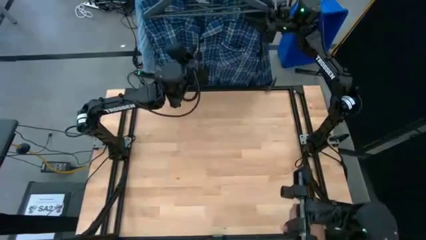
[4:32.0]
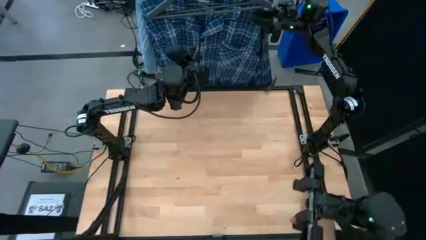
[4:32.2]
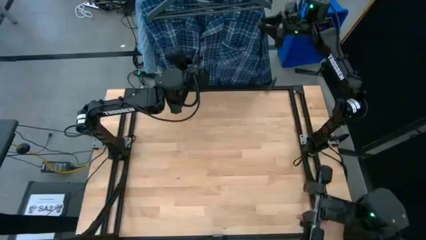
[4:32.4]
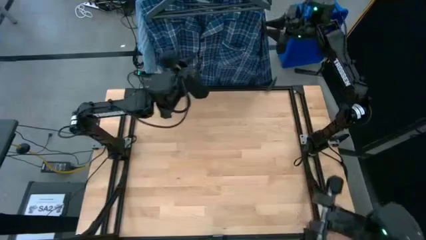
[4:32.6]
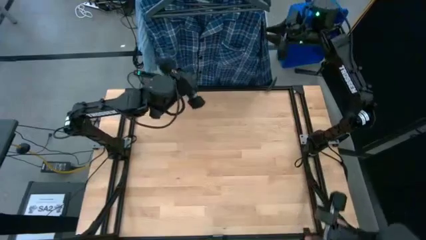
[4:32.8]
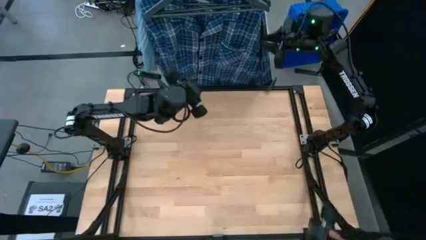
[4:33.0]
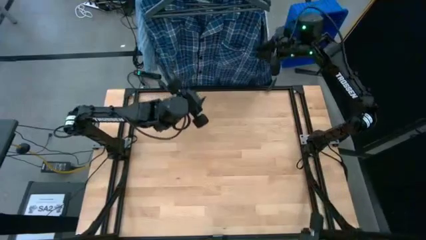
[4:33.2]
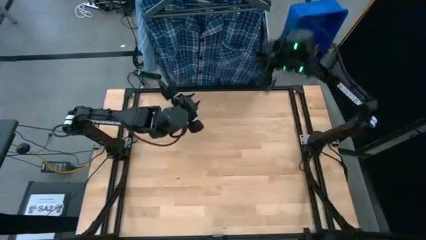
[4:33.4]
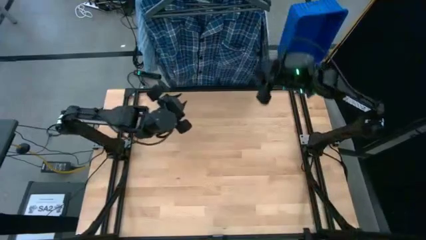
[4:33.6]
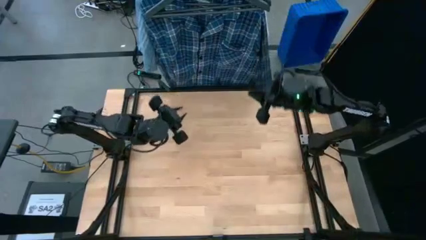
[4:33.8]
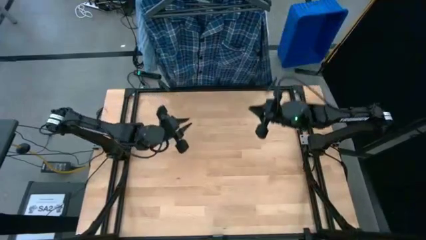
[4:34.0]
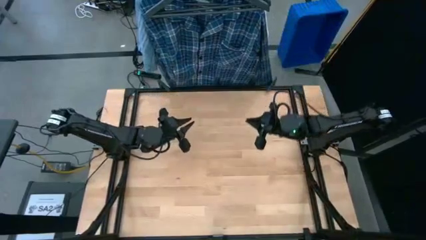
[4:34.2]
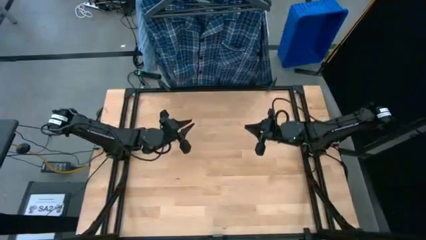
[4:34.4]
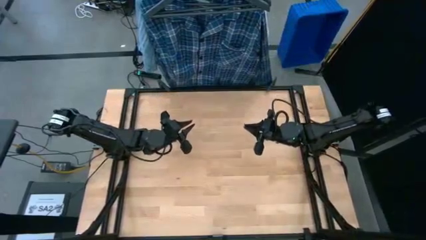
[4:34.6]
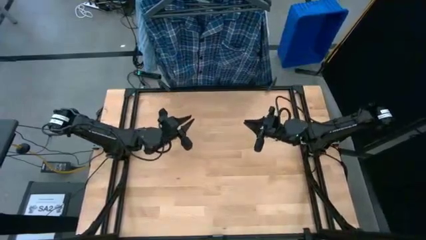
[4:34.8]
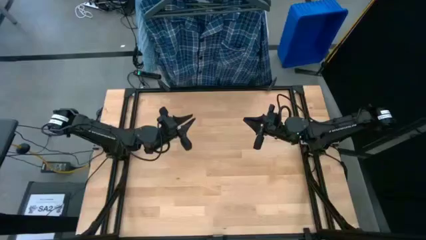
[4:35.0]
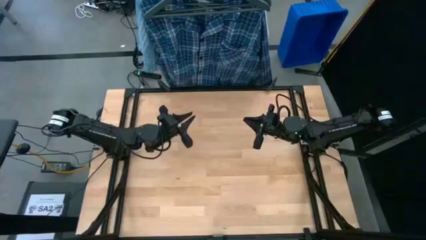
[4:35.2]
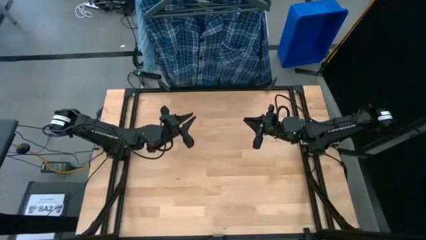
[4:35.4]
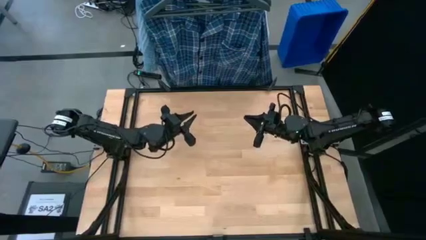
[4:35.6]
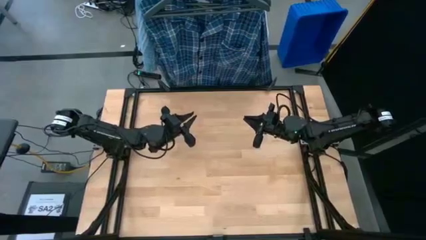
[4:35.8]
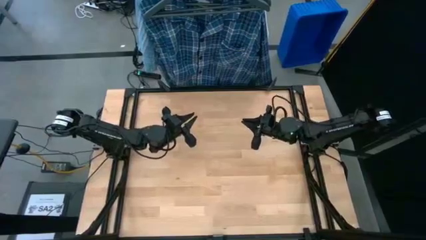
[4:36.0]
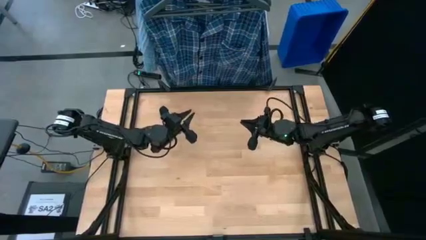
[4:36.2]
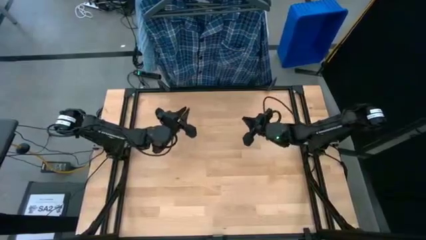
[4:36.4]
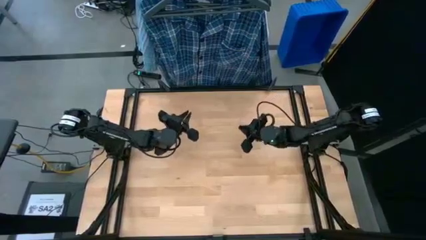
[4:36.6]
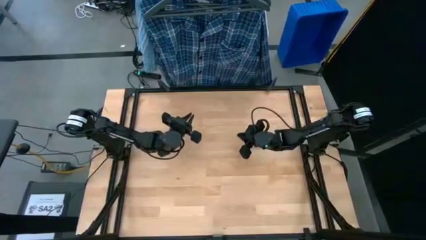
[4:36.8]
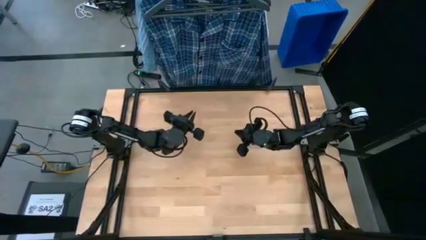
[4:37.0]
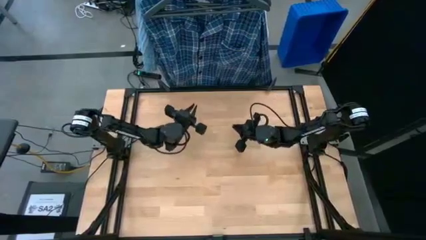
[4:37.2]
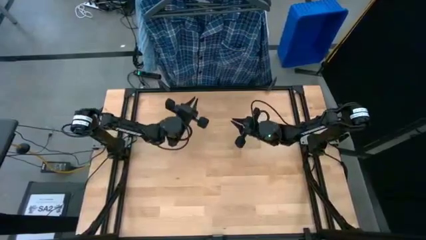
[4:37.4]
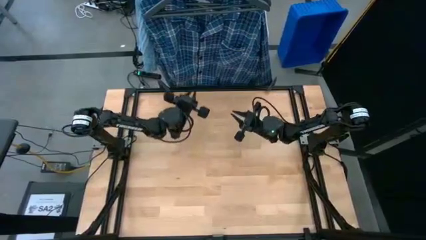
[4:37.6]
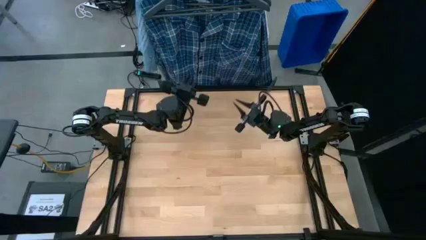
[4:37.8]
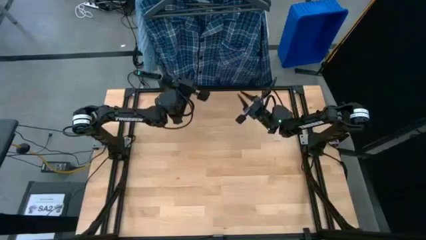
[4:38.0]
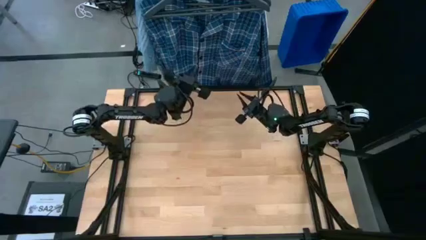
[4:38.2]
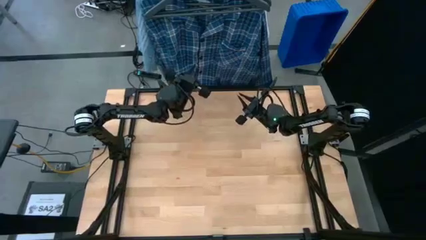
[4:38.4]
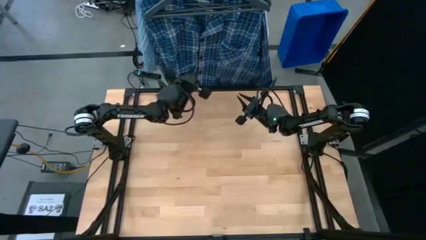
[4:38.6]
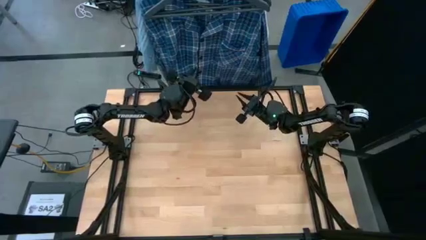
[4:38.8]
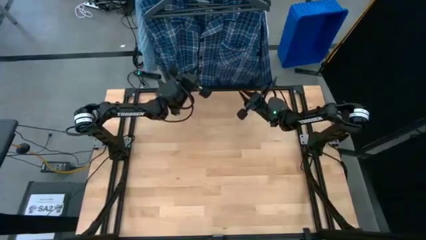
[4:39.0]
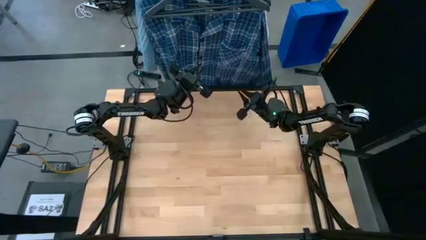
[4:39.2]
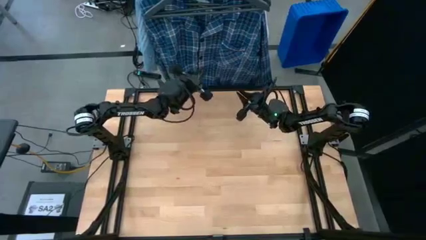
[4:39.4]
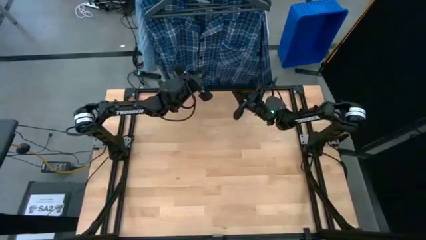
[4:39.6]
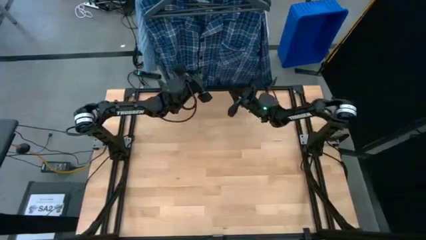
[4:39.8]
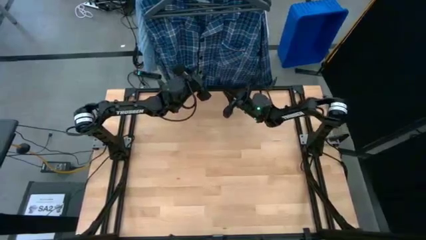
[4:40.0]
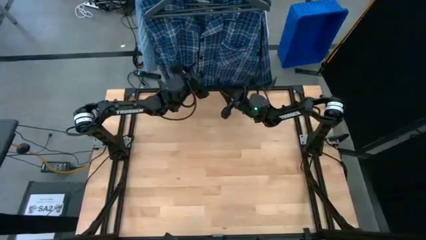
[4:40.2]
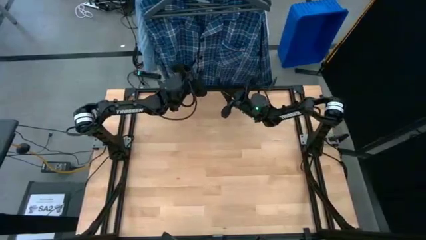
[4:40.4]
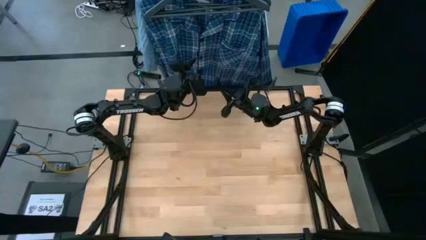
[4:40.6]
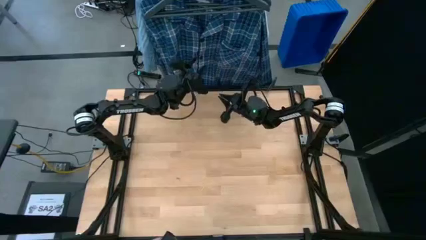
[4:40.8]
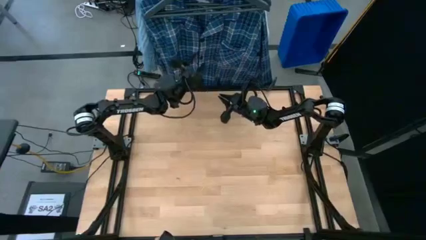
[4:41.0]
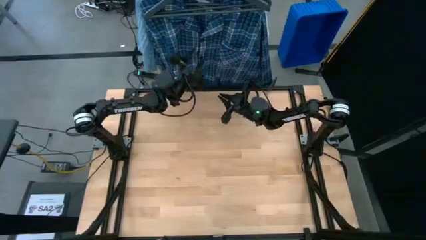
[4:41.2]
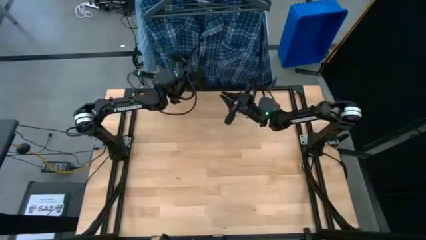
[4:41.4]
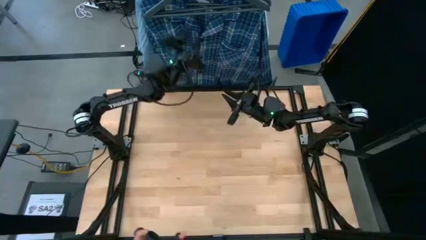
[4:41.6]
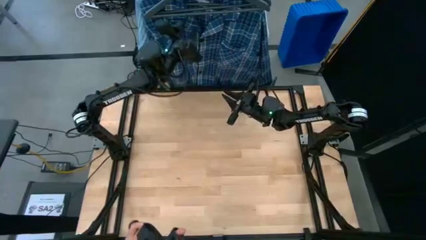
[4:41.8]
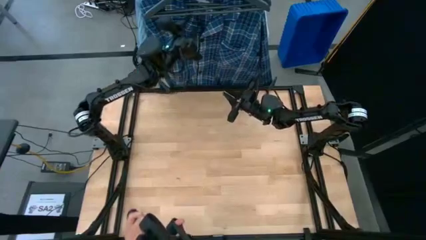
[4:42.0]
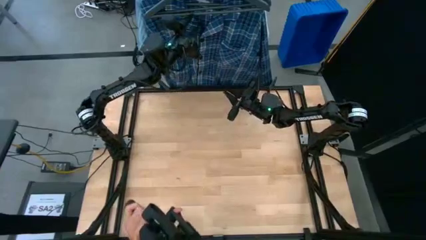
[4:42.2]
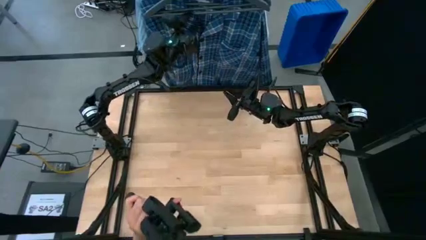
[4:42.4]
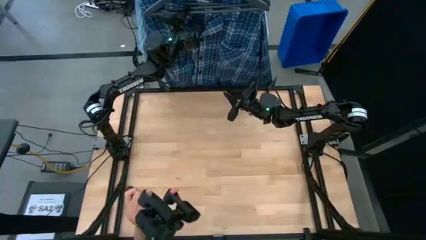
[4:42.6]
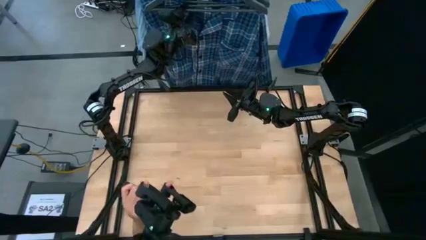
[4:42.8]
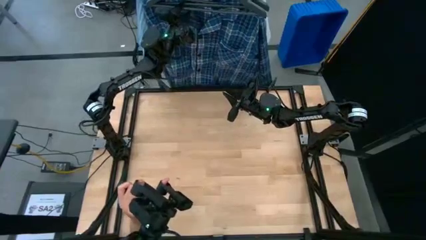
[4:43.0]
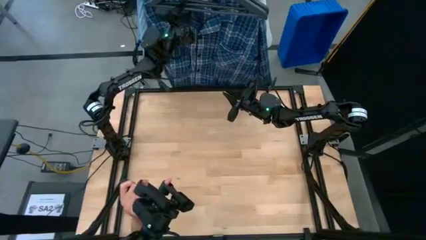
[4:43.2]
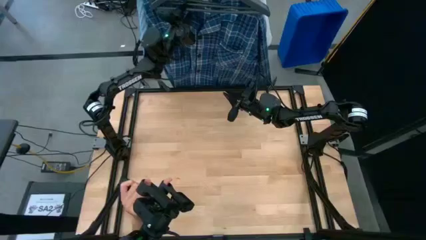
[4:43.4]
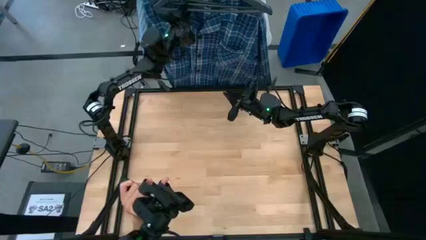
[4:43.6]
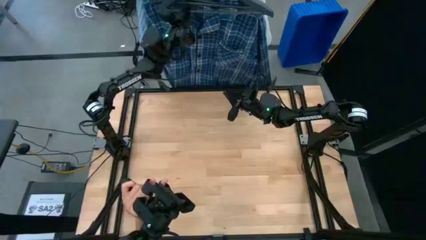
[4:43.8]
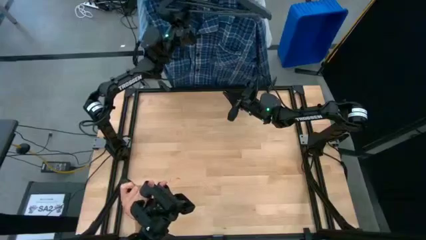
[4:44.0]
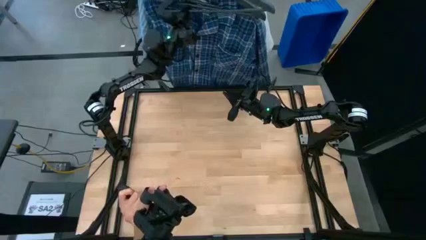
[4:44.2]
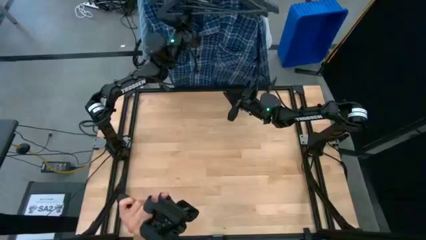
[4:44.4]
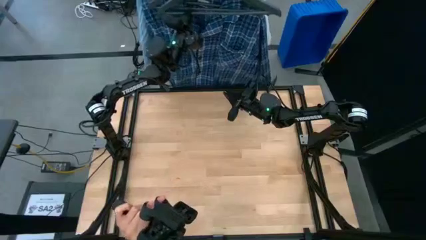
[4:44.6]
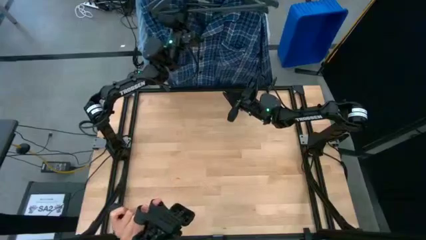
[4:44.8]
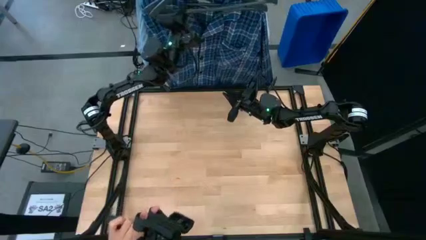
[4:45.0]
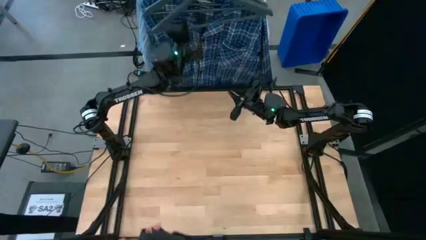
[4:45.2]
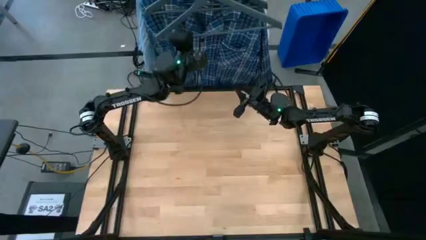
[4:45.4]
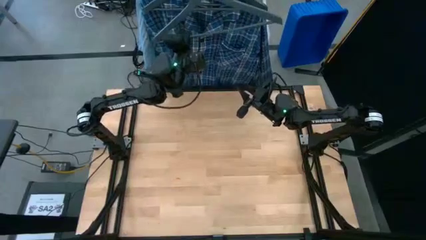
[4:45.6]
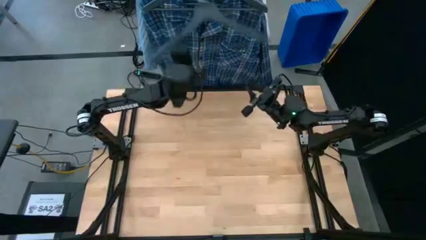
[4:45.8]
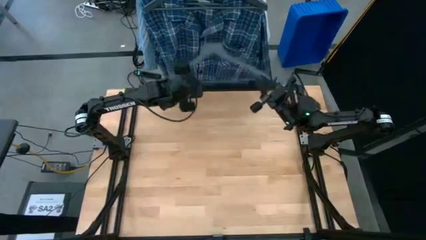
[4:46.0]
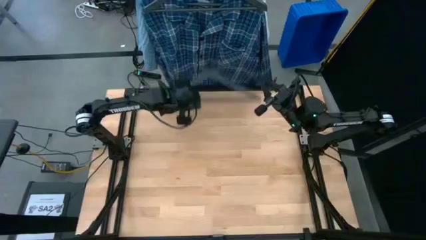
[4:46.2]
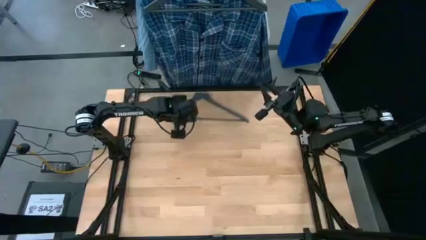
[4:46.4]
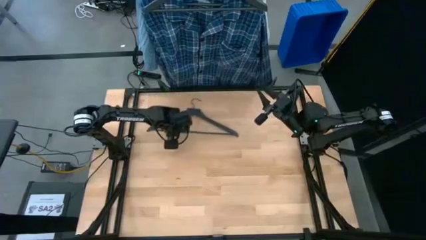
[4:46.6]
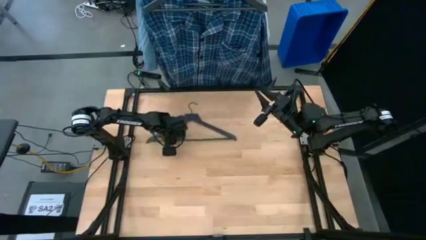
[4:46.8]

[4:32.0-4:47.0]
Task: Hang clothes
Unhang the black hanger from the hanging rack

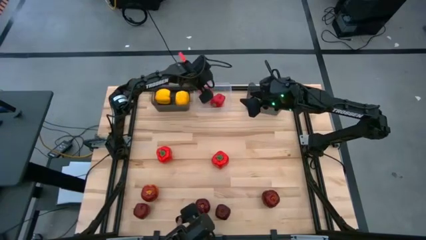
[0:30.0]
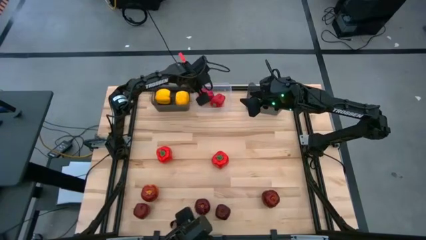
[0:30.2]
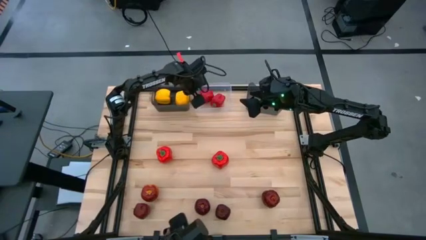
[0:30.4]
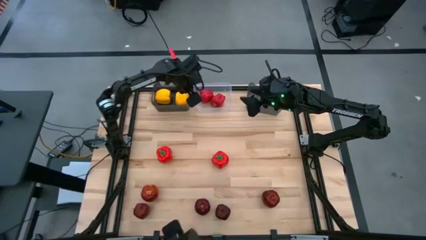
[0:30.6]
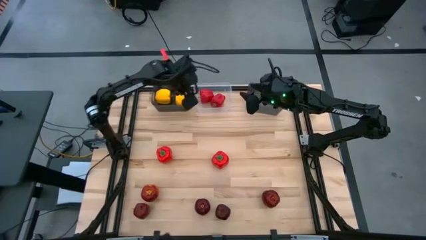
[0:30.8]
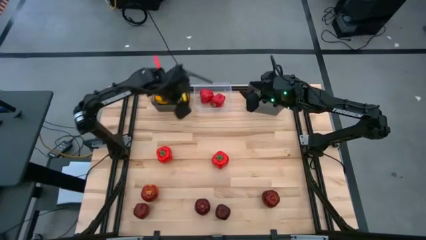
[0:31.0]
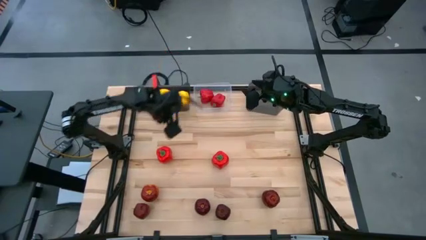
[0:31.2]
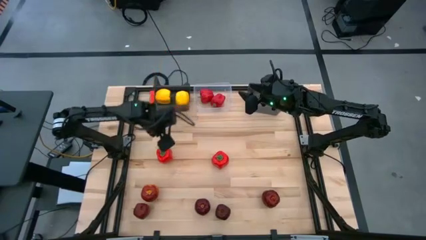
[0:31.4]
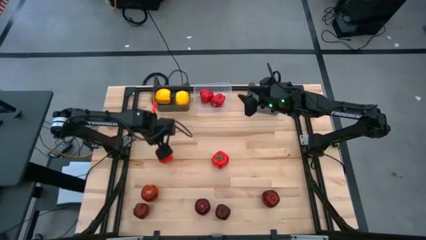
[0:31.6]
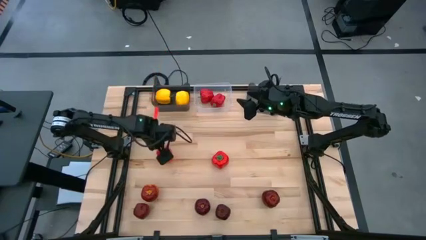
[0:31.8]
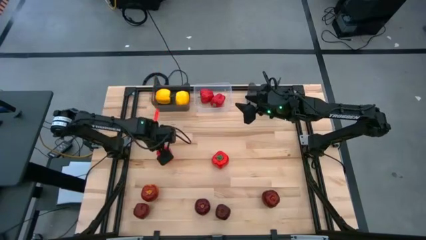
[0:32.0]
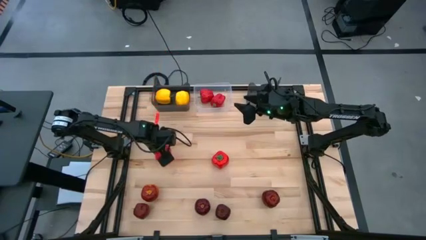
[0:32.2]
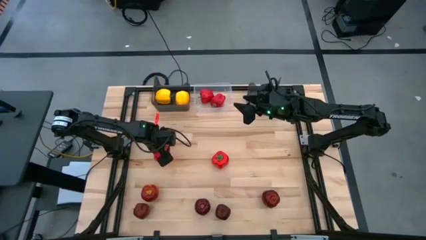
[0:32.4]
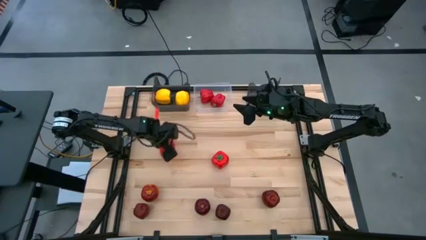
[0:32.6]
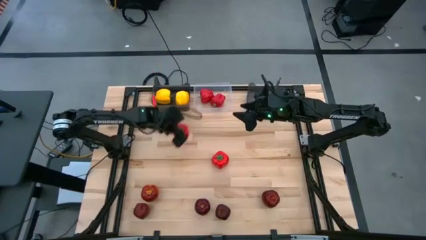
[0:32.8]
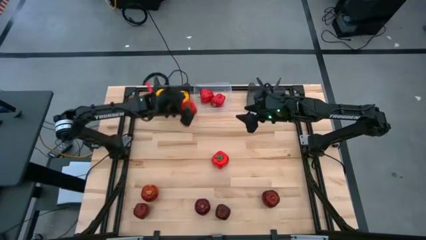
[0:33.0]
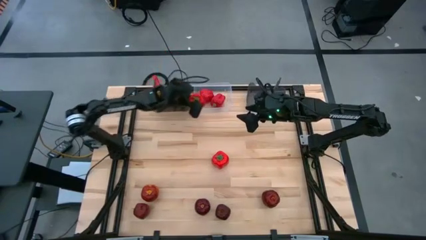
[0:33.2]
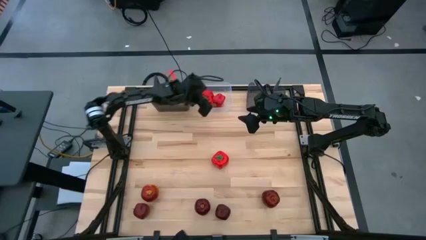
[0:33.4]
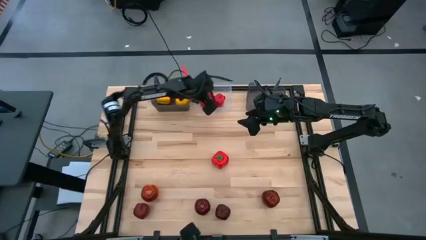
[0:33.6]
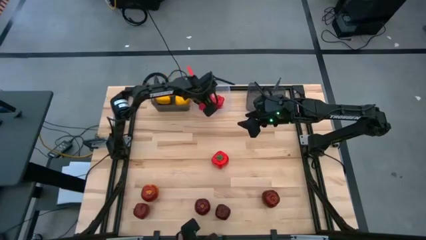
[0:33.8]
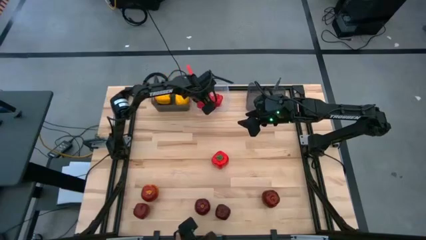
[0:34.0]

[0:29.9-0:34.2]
Task: Sort produce into baskets
Put the left red bell pepper into the transparent bin
